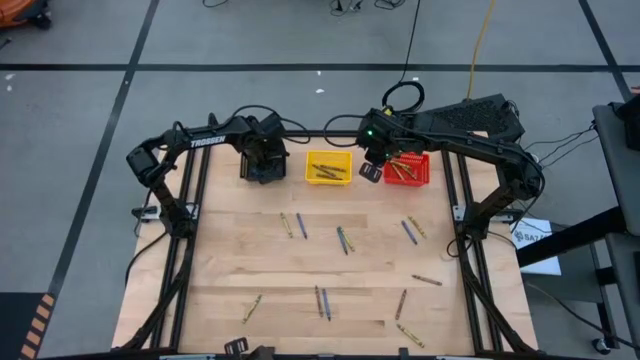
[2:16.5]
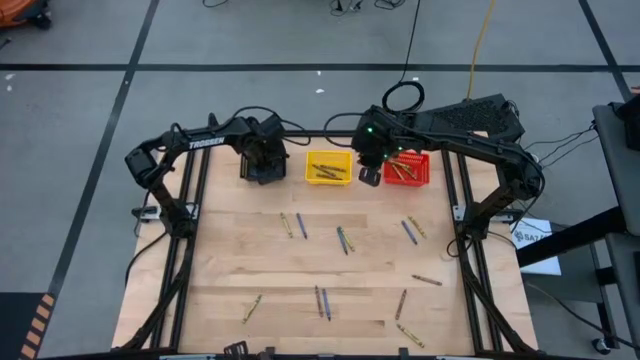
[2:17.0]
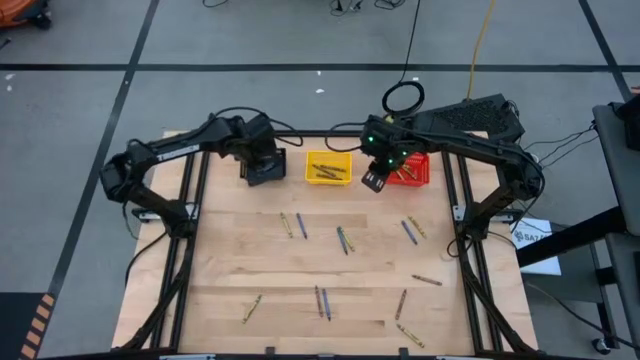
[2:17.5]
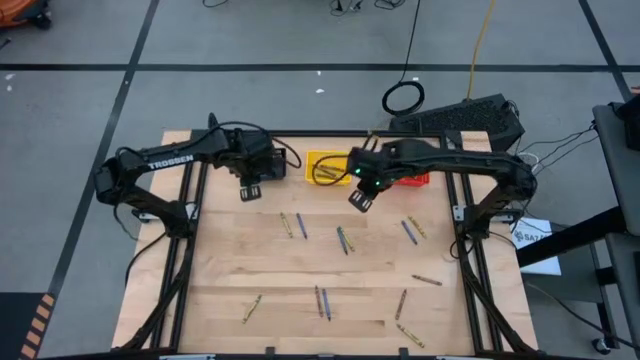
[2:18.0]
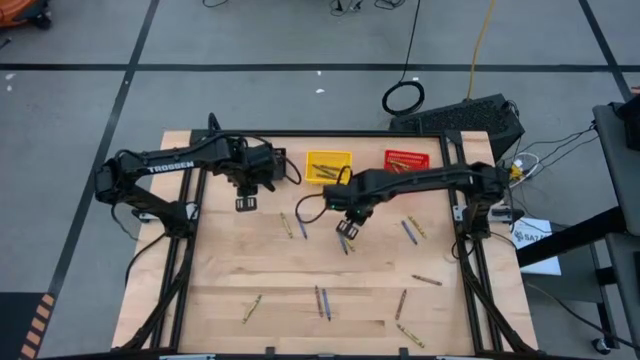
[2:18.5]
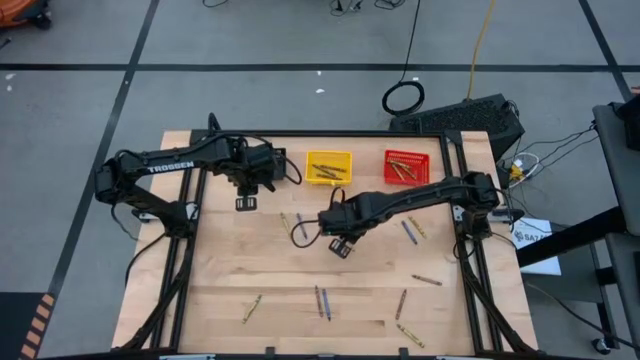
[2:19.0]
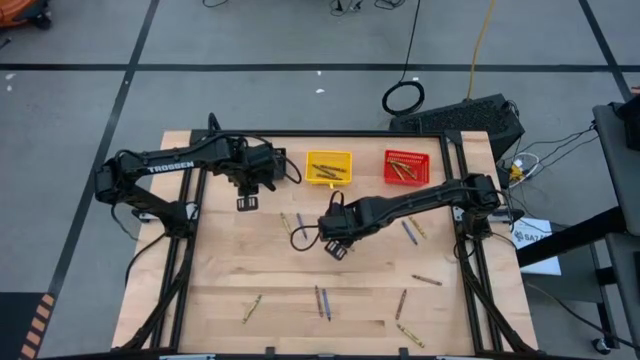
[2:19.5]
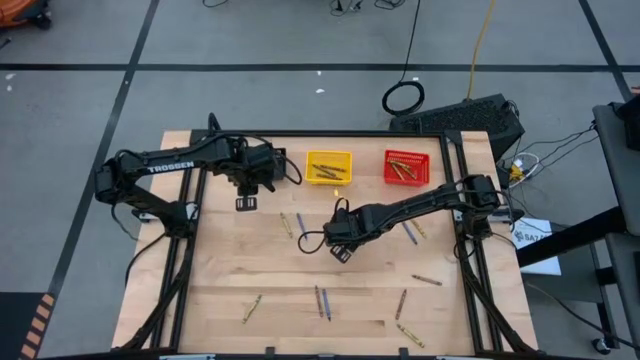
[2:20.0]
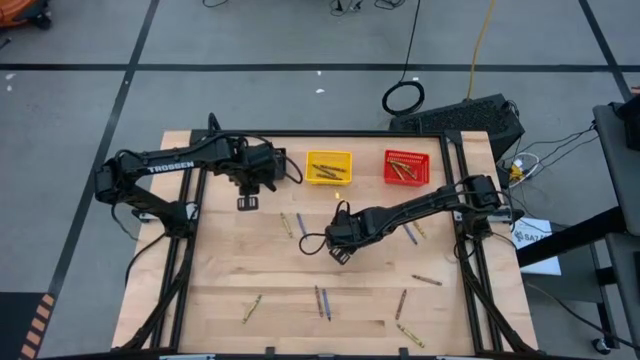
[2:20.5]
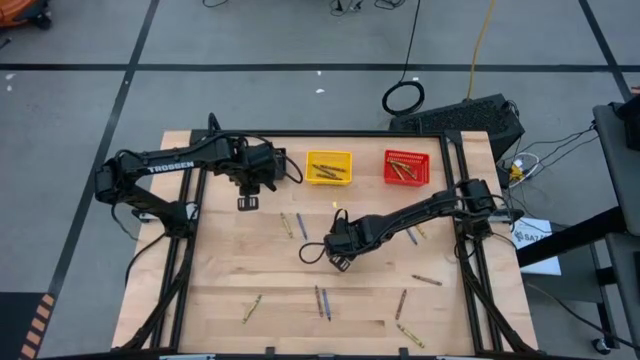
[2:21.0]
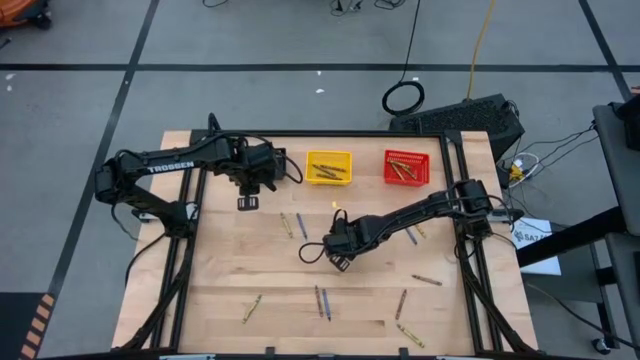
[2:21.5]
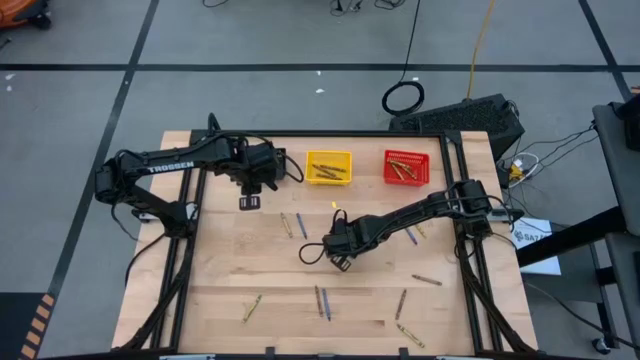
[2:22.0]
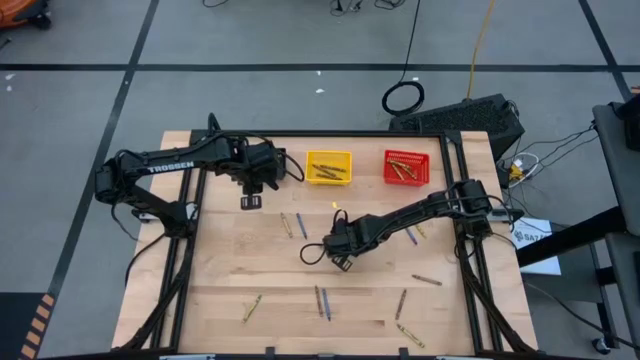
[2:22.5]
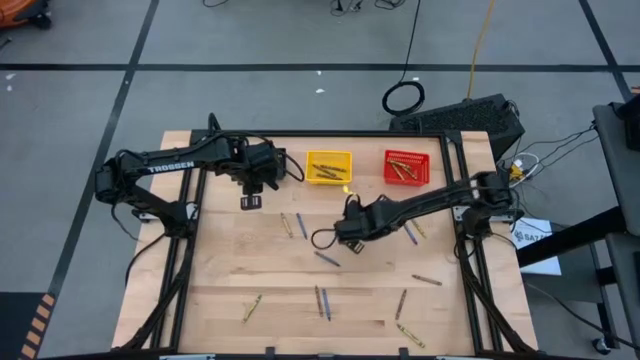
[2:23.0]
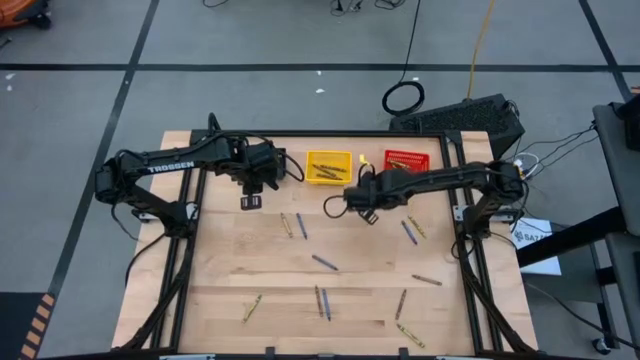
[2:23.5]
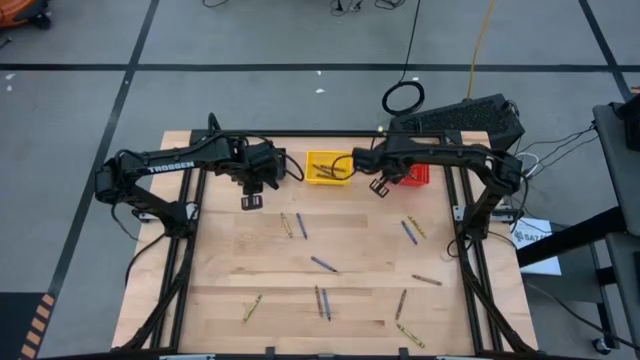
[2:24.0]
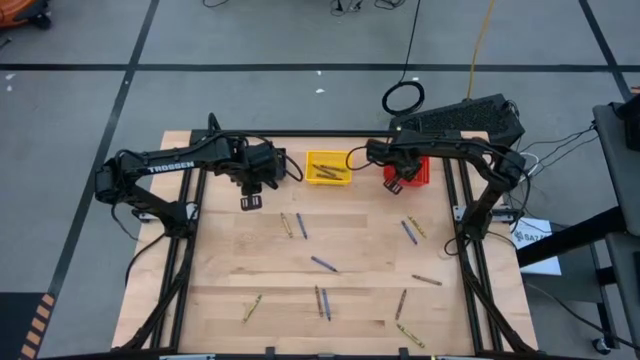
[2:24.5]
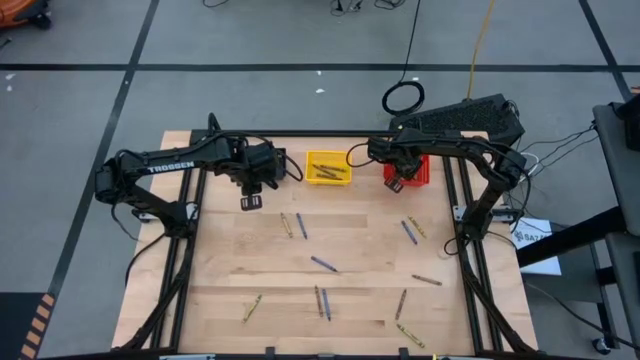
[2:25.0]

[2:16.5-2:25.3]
Task: Sort crayons
Put the green crayon into the red bin

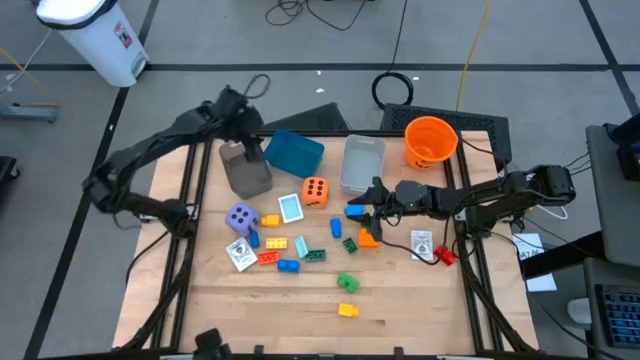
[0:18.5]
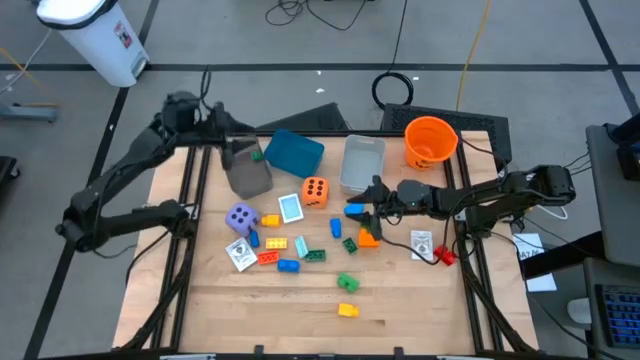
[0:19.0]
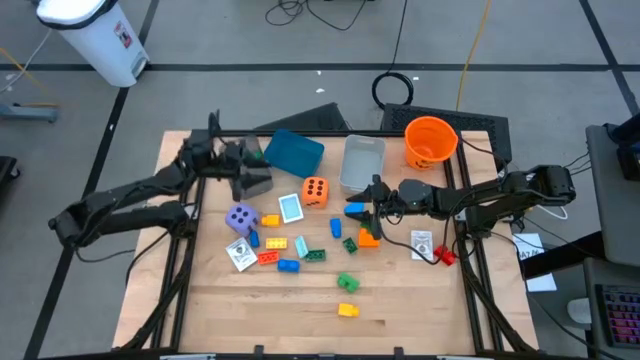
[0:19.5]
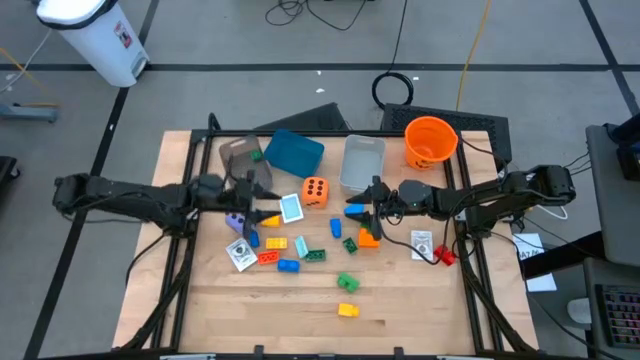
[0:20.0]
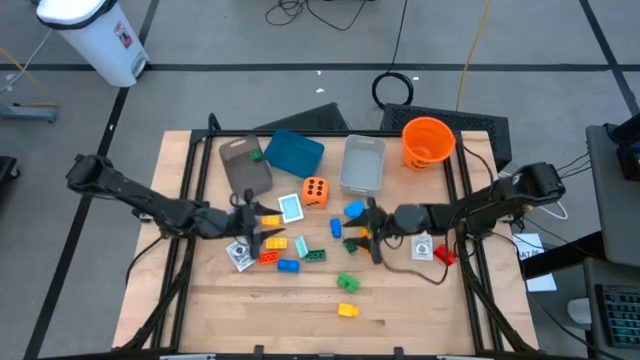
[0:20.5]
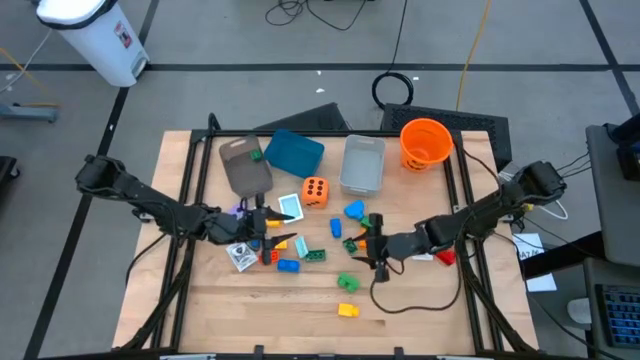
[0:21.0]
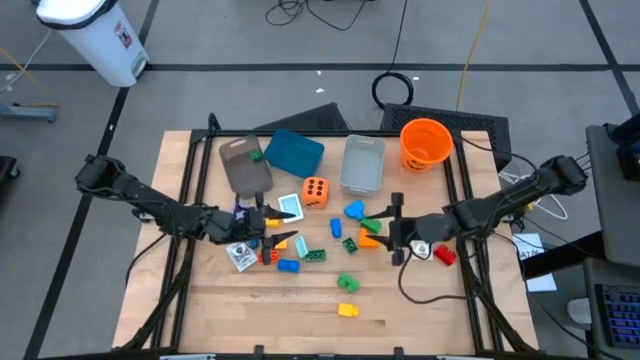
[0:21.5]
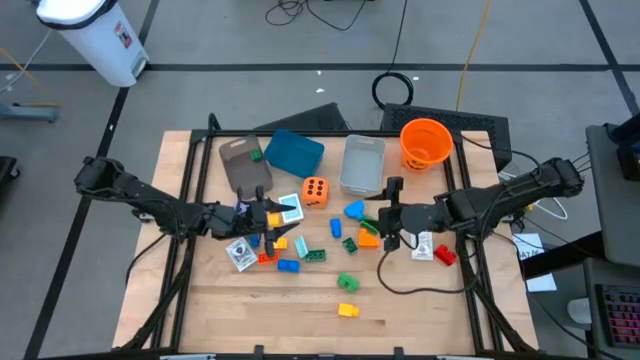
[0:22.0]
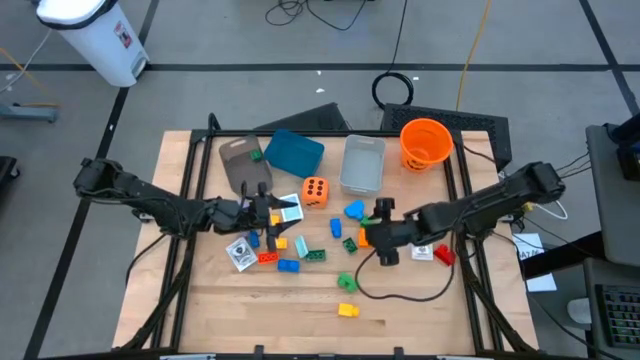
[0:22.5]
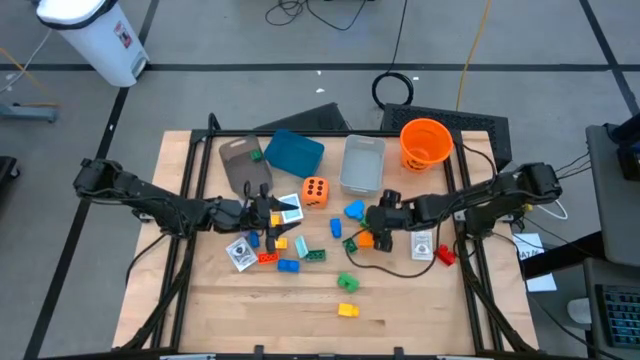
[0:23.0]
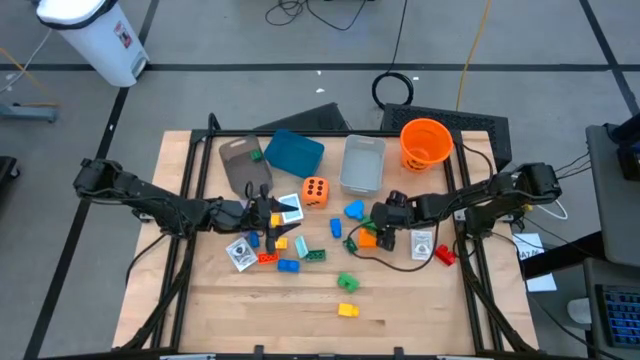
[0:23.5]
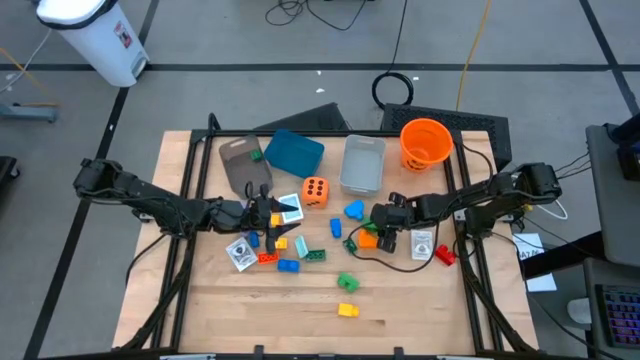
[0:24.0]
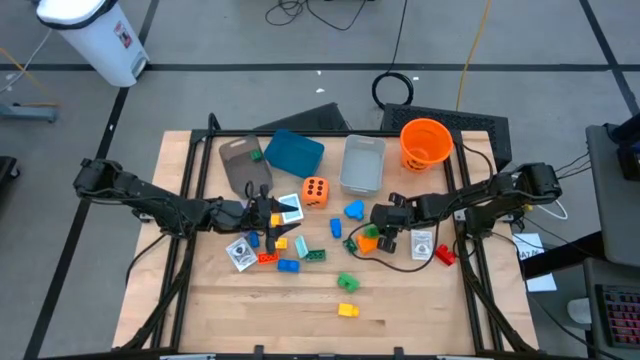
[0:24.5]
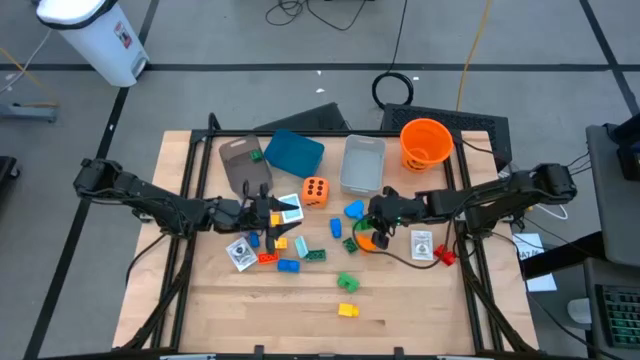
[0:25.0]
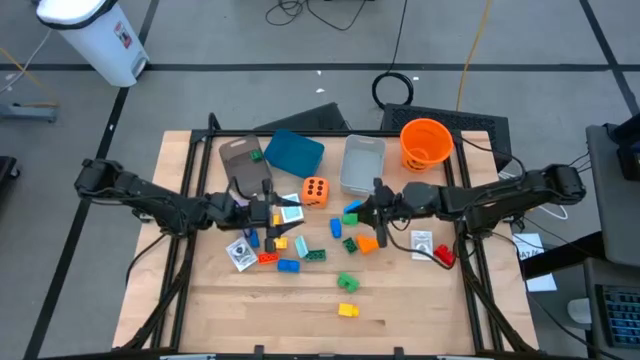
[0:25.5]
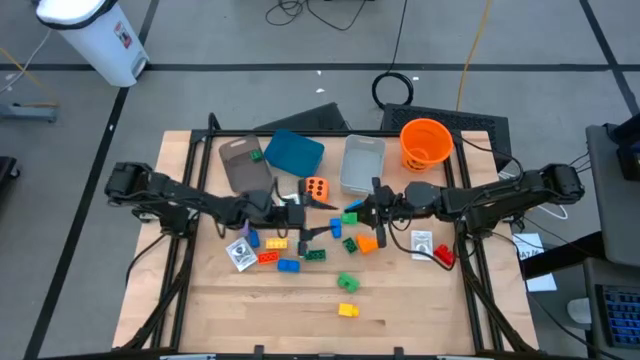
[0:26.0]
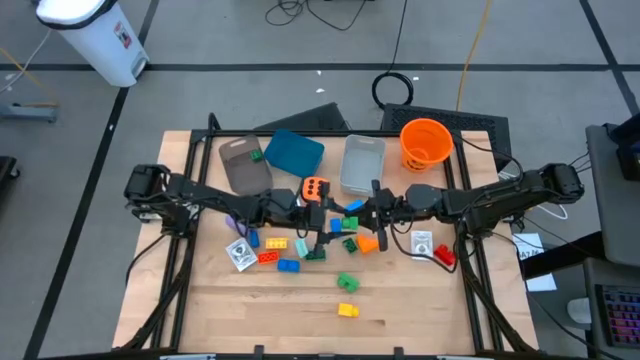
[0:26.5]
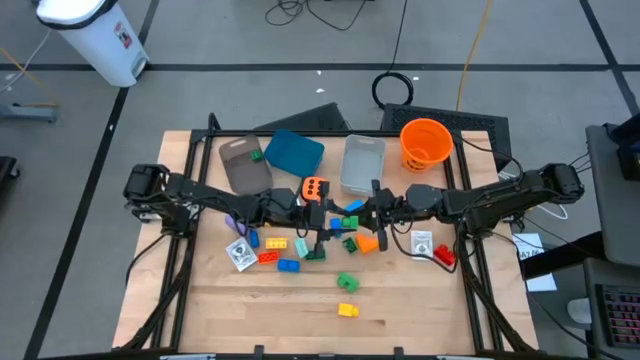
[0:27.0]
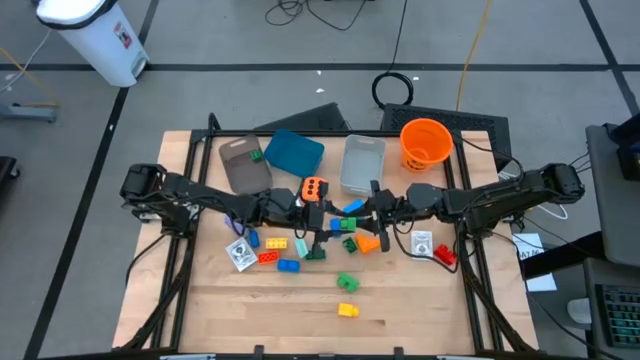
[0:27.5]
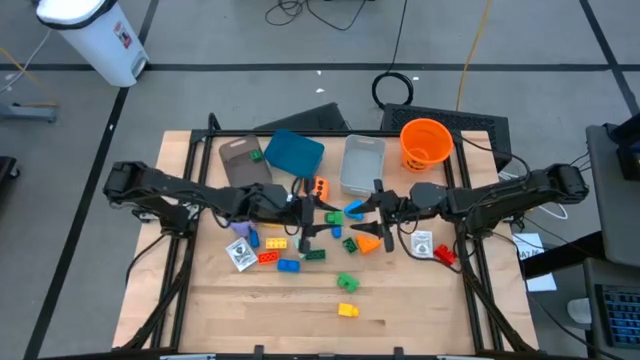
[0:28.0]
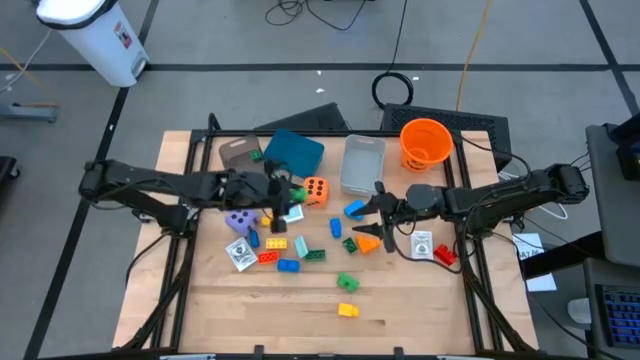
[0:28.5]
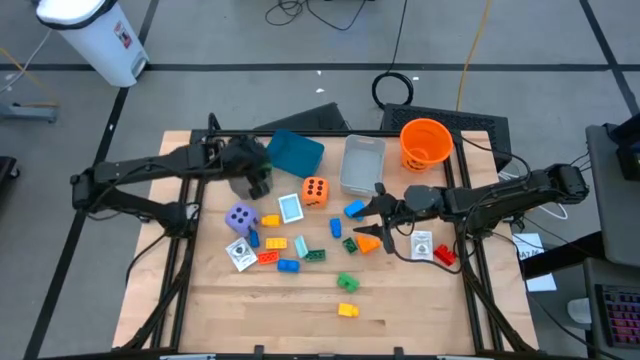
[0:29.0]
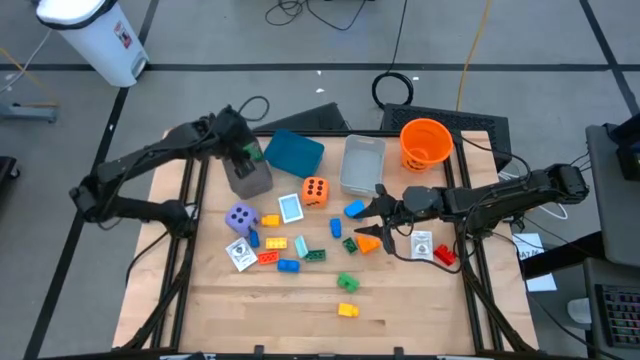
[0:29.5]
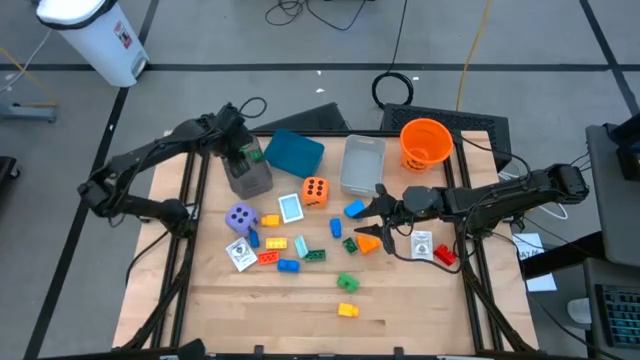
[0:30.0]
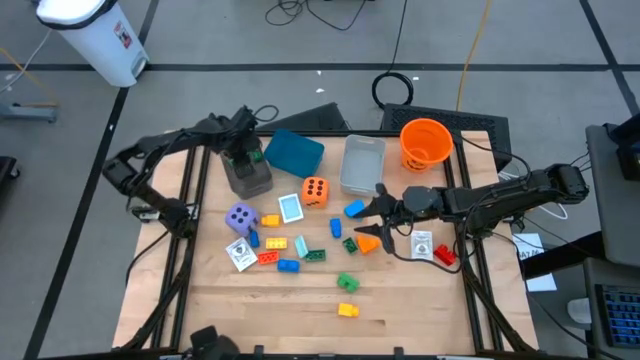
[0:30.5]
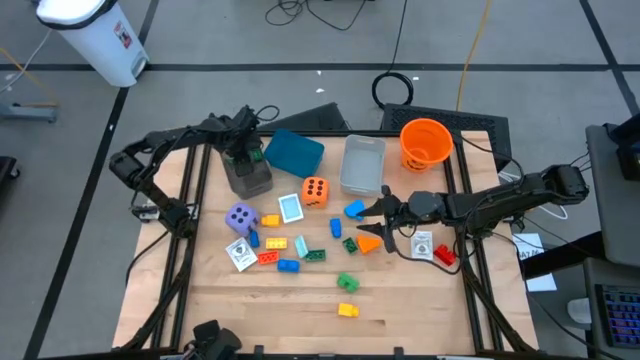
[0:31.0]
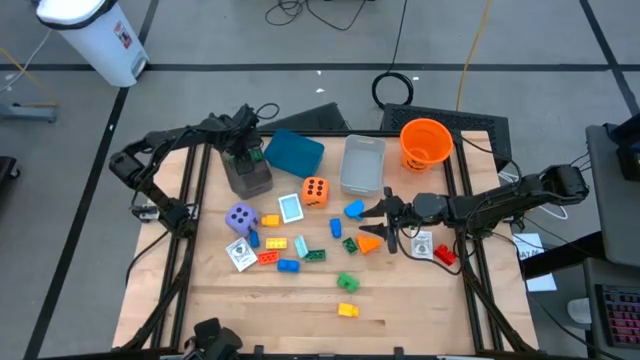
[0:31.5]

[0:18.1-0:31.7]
Task: Pick & Place Toys
Put the green game piece into the black bin
